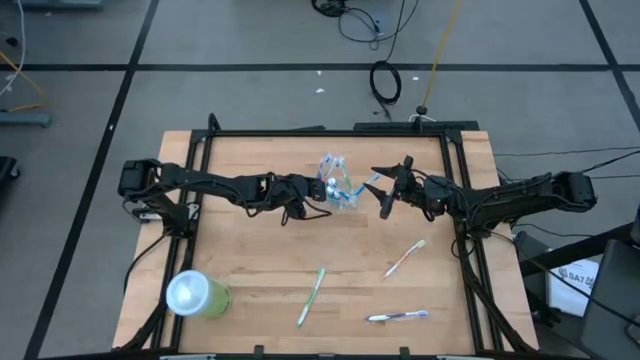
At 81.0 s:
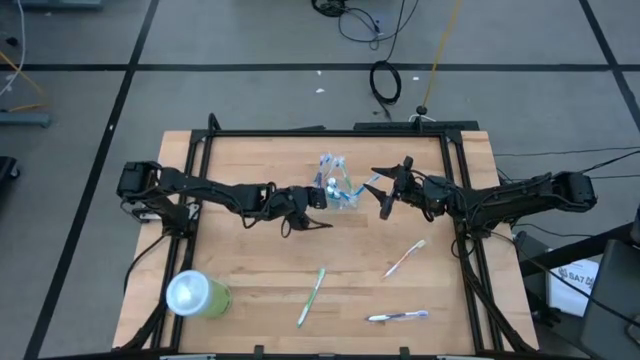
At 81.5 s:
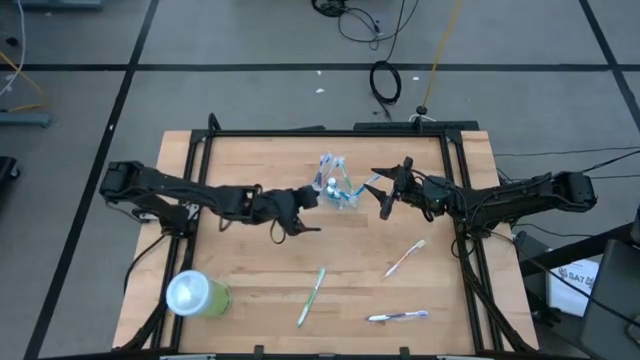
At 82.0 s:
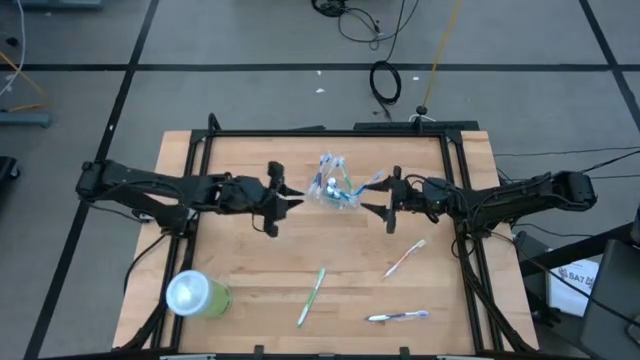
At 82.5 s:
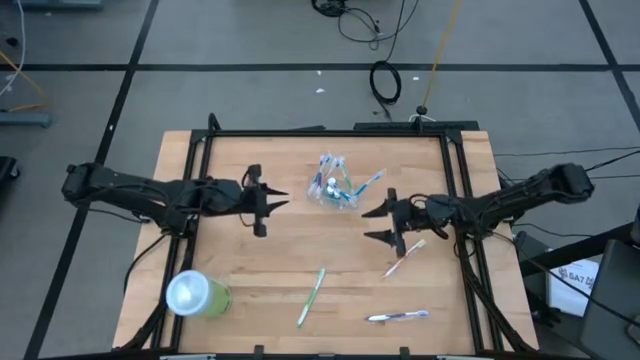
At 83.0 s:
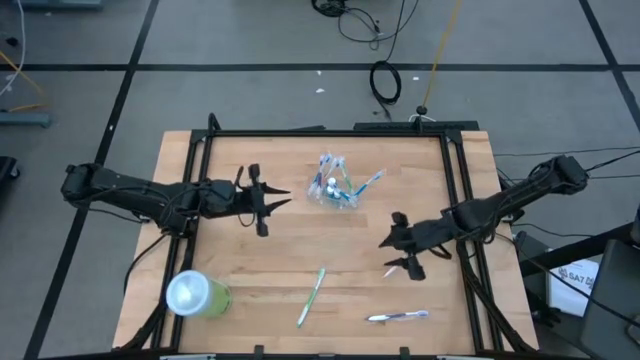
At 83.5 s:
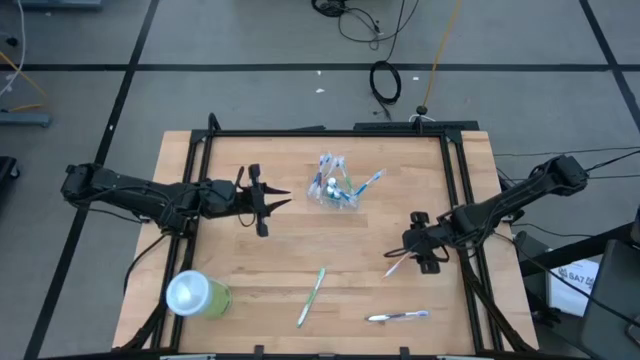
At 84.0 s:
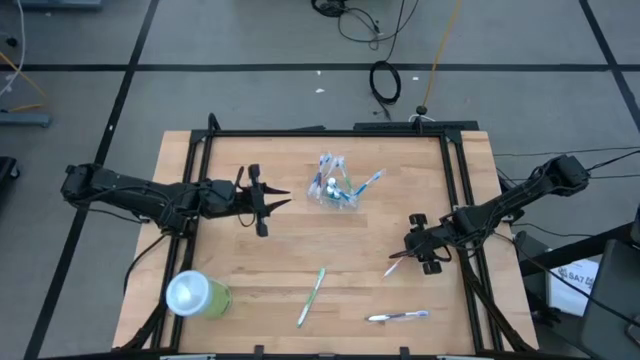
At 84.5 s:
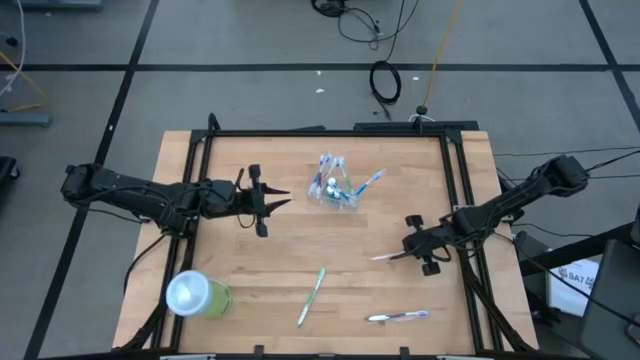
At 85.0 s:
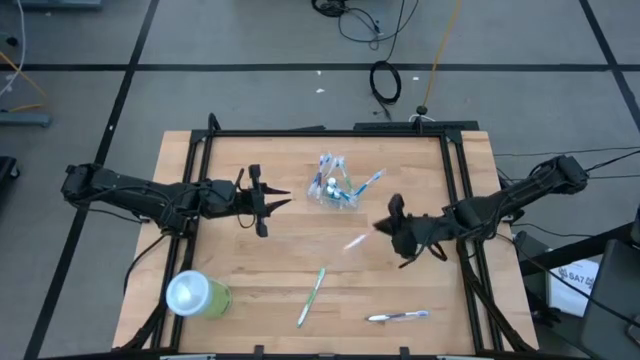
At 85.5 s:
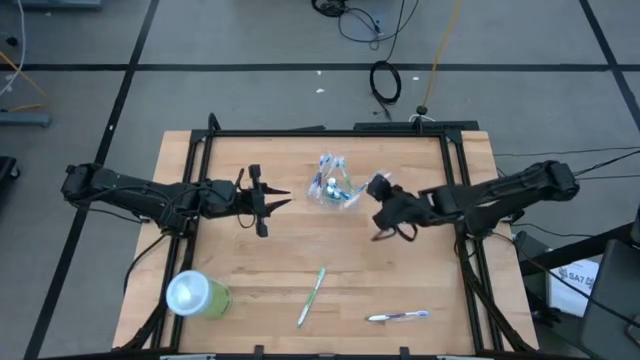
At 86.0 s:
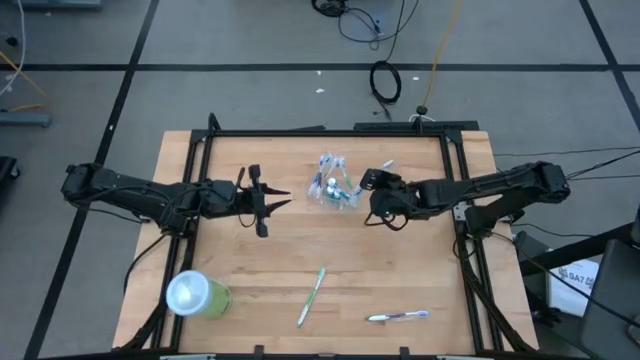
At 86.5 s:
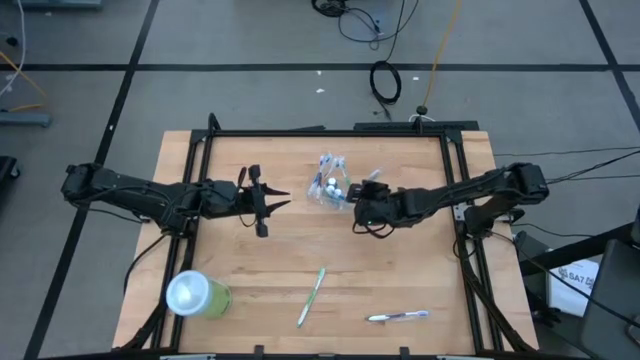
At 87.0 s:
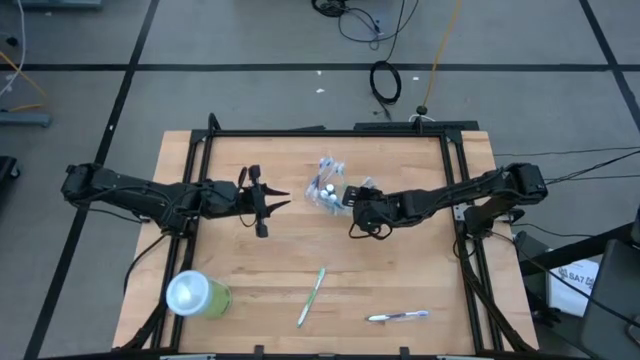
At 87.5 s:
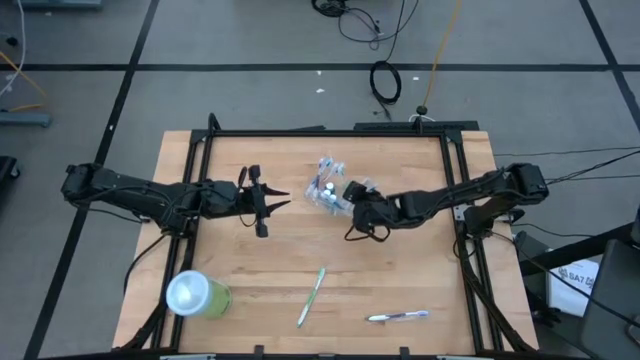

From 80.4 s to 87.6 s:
Task: Pick & Place toothbrushing station
Put the orange toothbrush into the transparent organizer

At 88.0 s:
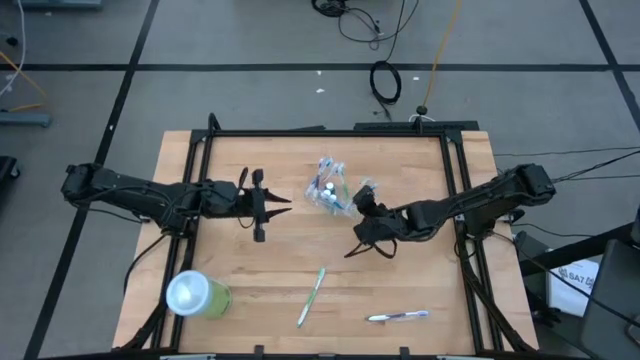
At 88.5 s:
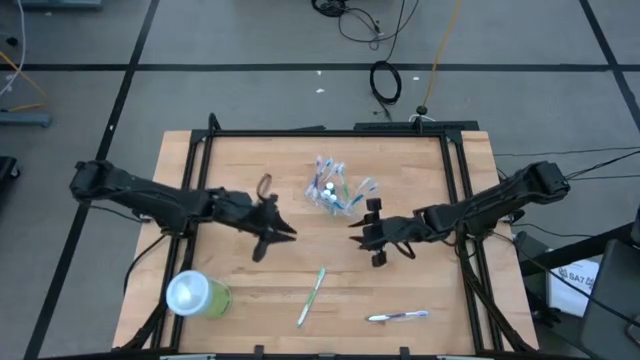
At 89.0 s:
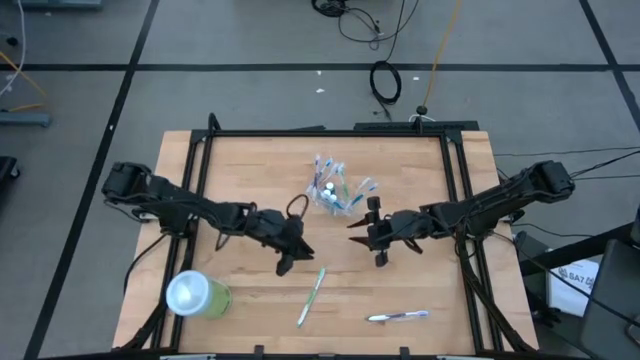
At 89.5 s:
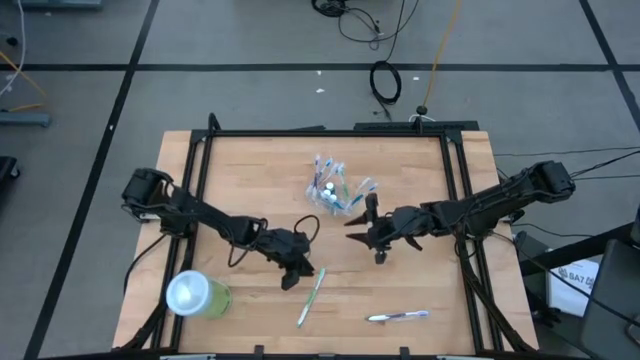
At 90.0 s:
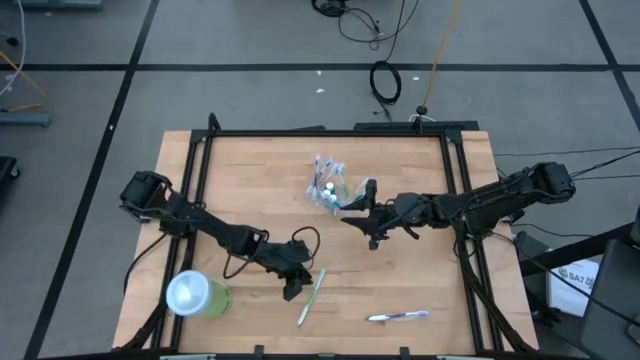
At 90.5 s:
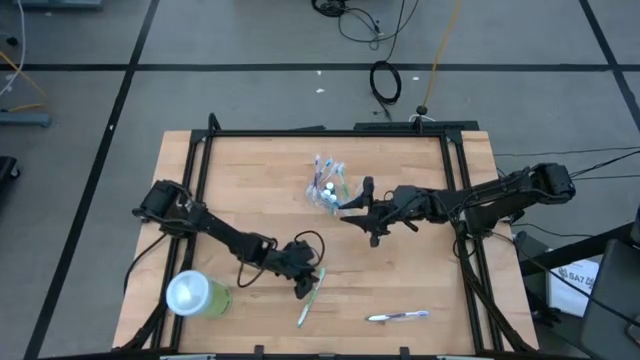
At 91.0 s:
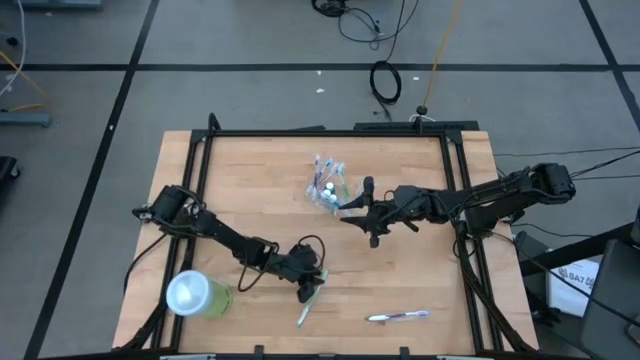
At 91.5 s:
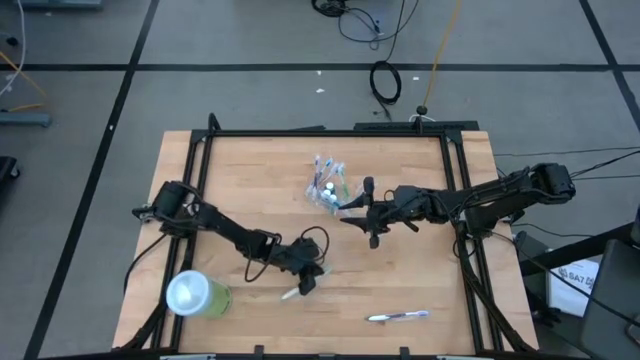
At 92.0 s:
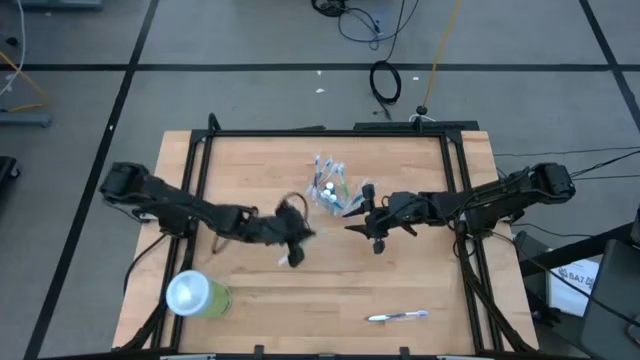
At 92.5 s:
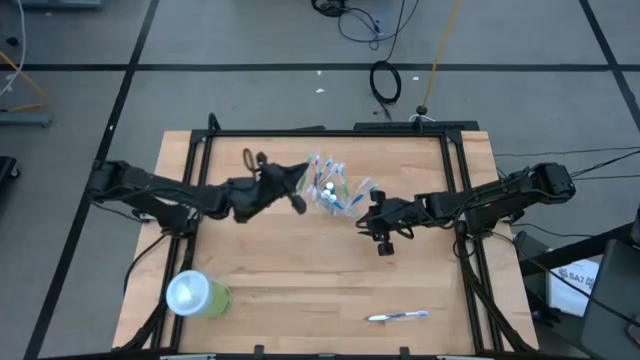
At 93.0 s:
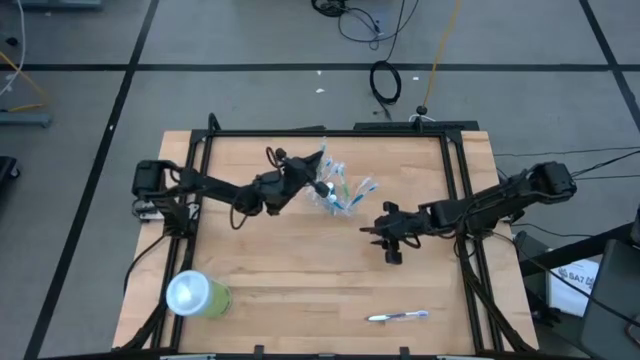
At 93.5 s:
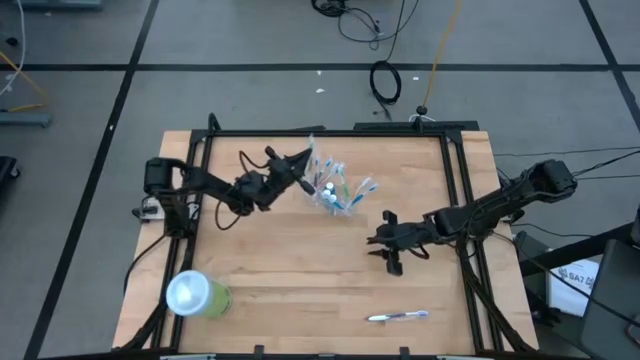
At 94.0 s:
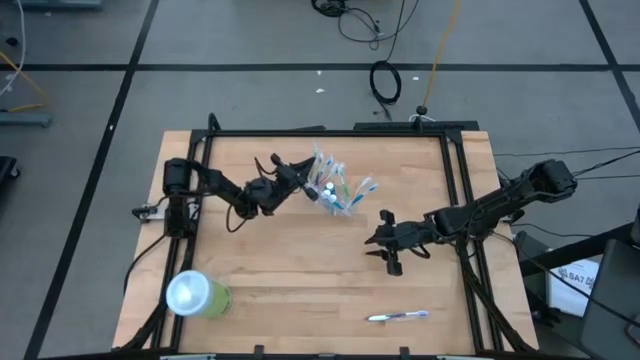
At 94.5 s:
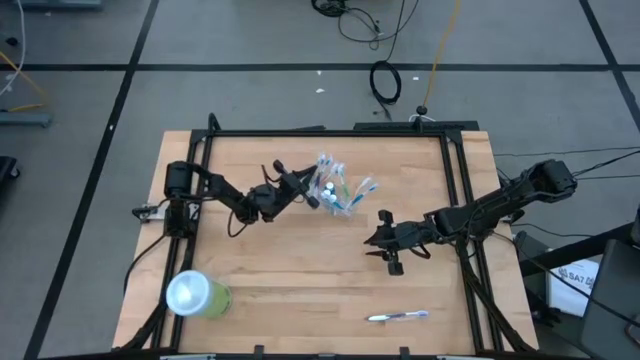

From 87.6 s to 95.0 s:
Put the green toothbrush into the transparent organizer

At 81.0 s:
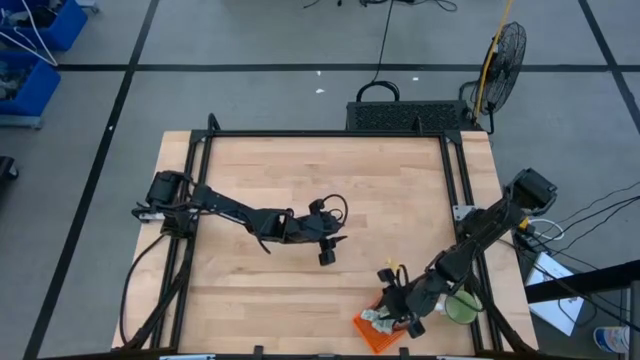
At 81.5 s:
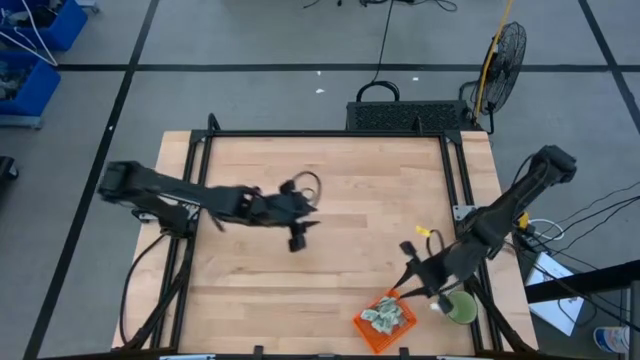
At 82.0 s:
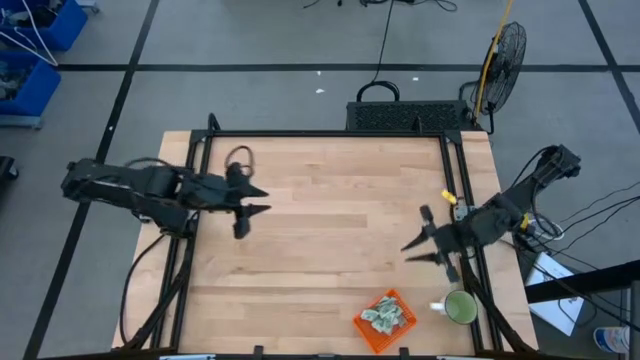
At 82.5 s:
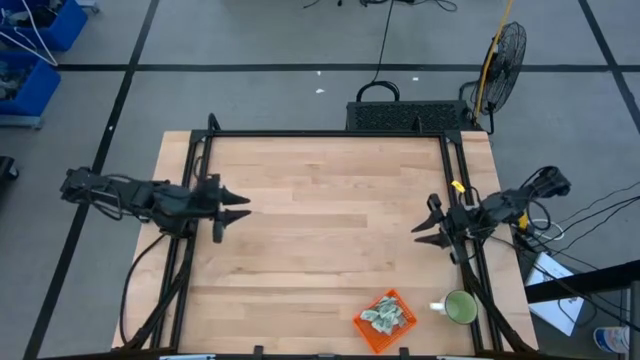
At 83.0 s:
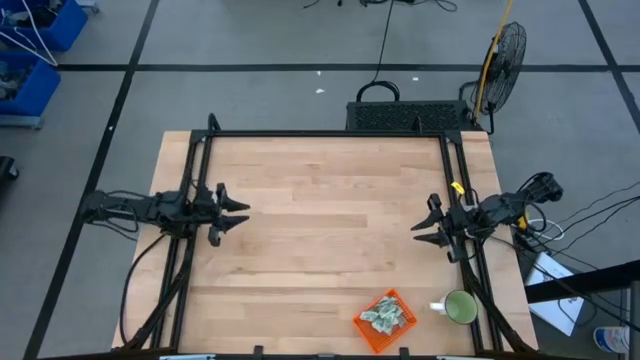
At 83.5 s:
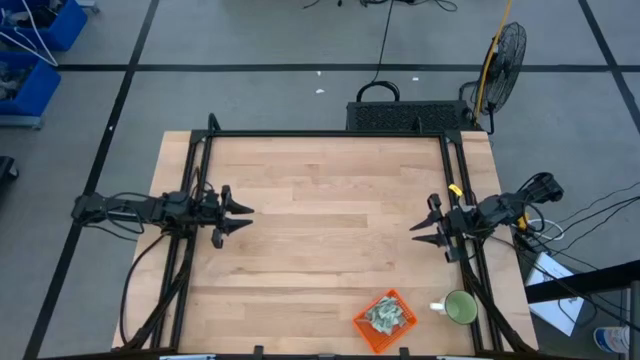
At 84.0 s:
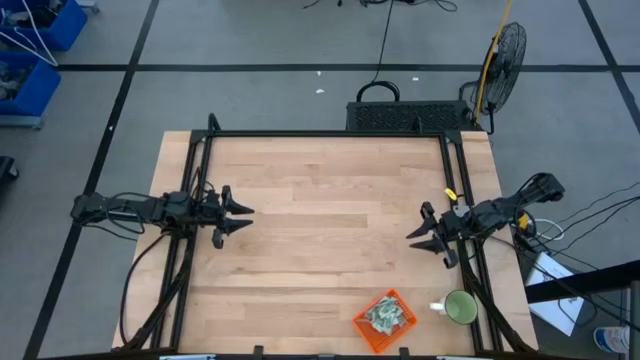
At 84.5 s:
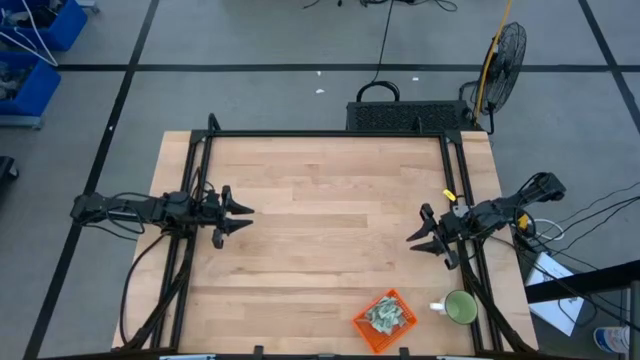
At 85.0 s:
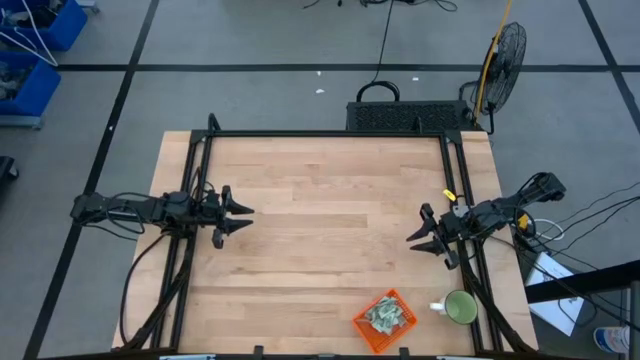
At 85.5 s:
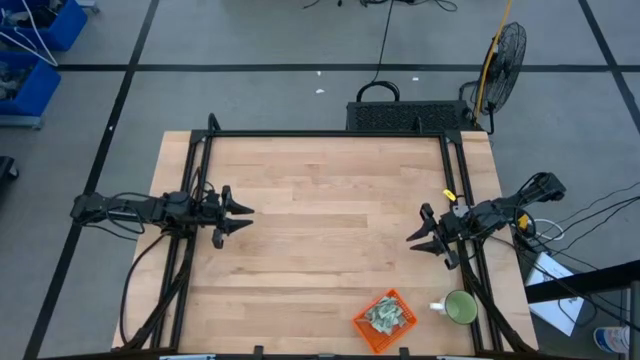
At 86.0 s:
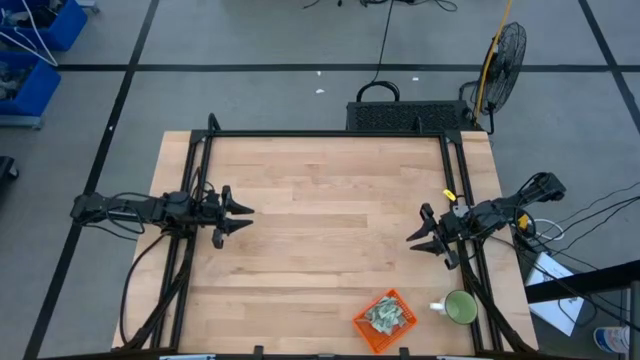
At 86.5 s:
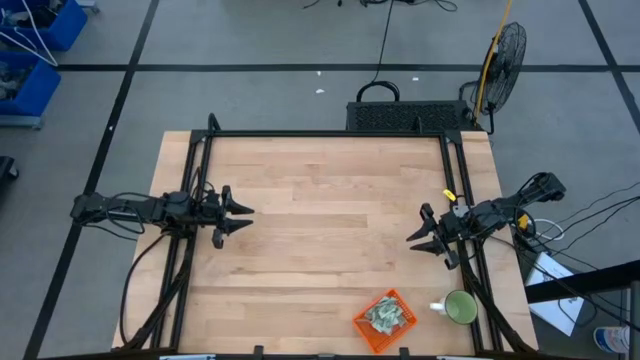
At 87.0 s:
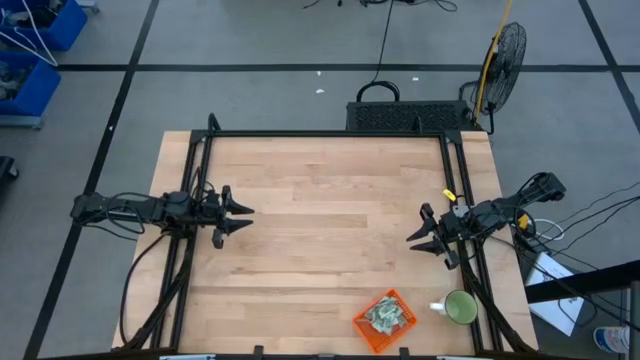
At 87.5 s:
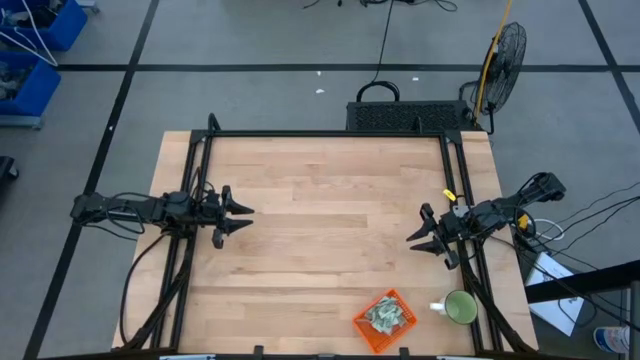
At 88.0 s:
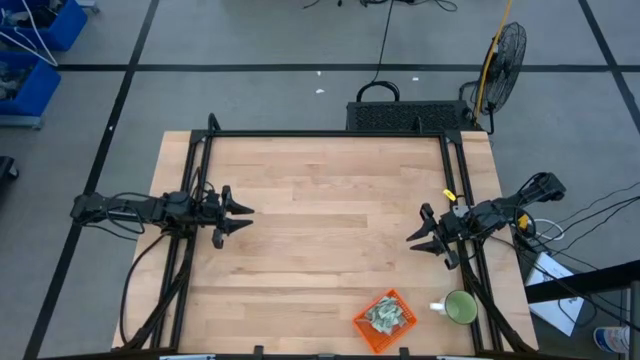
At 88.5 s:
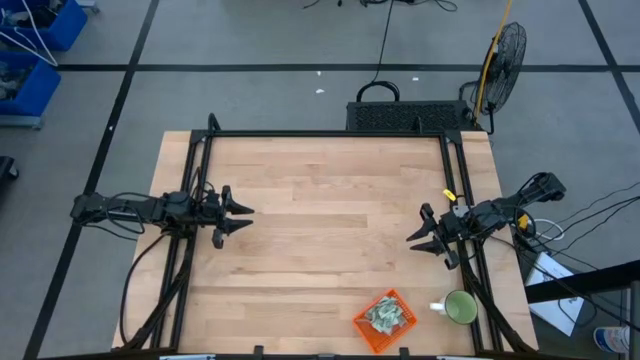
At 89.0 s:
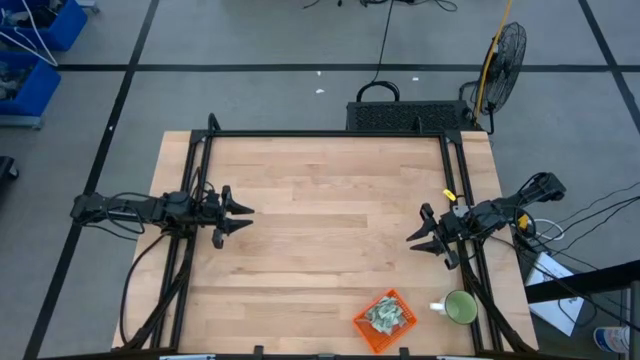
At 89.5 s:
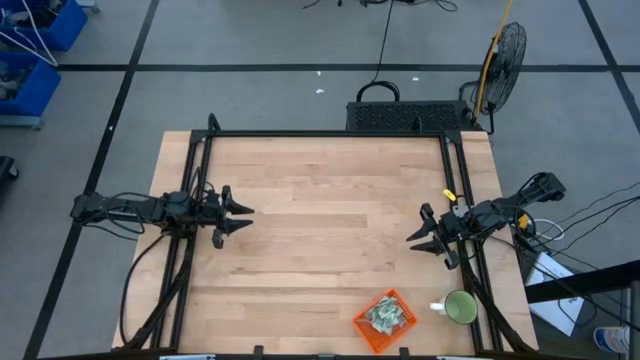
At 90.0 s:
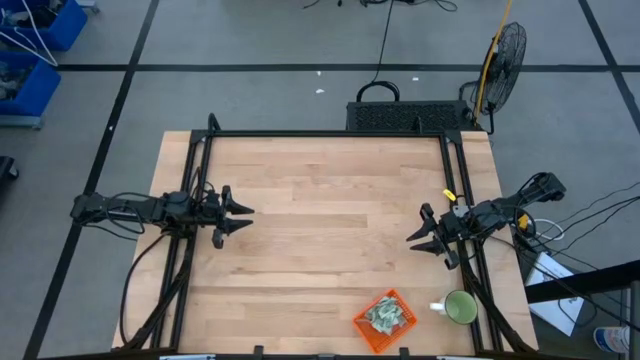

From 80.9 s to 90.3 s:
Task: Pick and place Stevia / Truvia into bins
Return to Home Position
